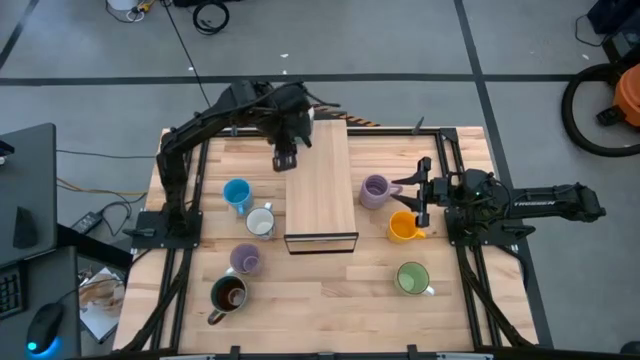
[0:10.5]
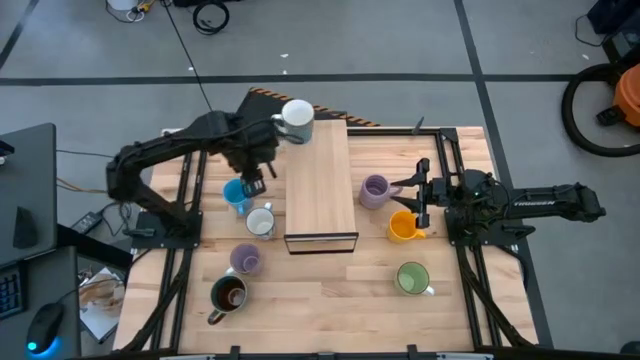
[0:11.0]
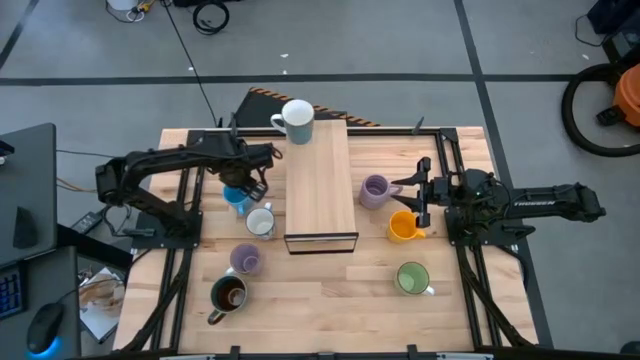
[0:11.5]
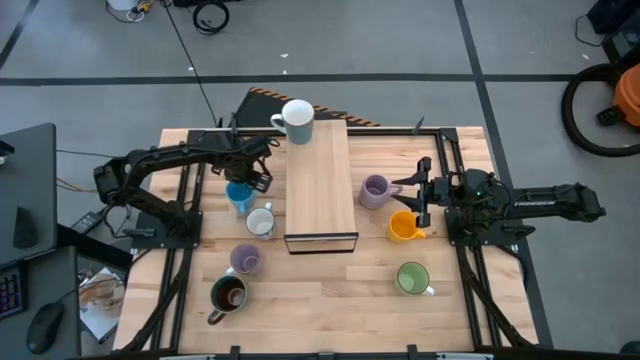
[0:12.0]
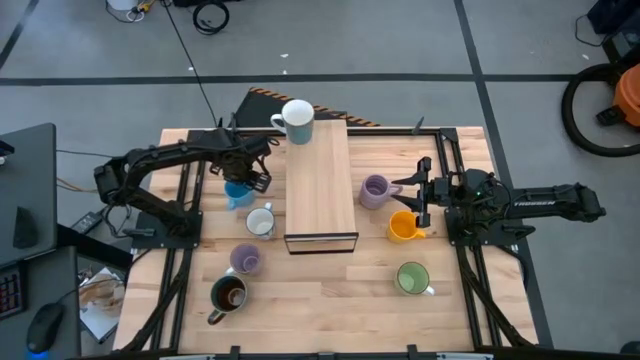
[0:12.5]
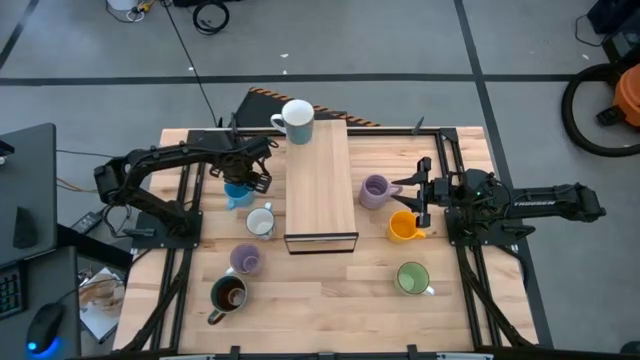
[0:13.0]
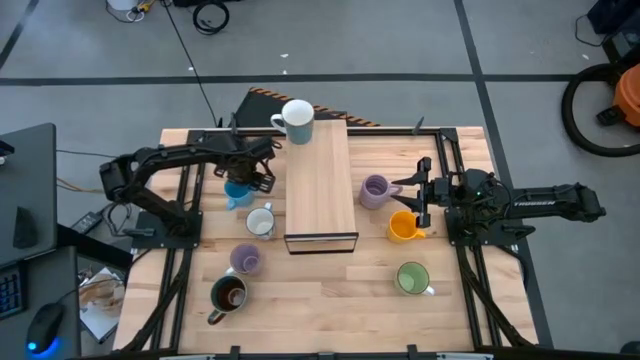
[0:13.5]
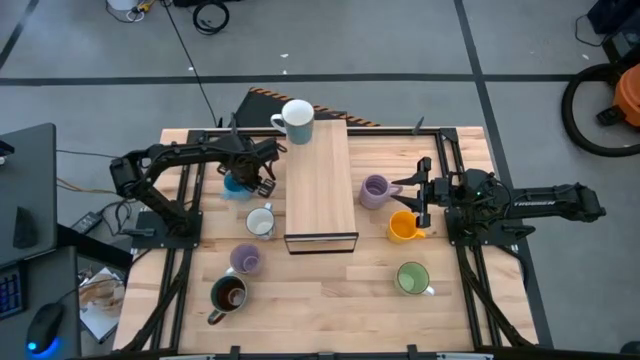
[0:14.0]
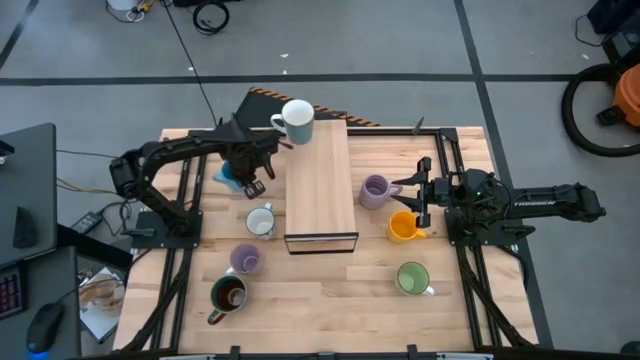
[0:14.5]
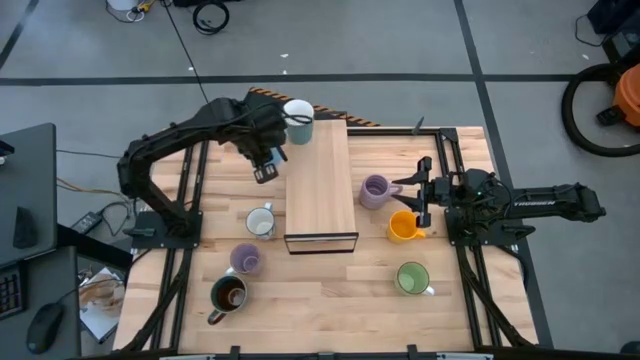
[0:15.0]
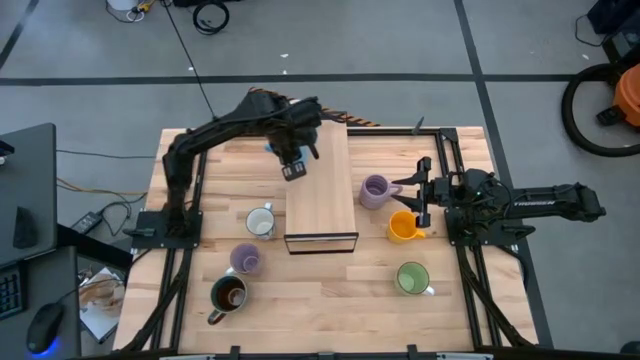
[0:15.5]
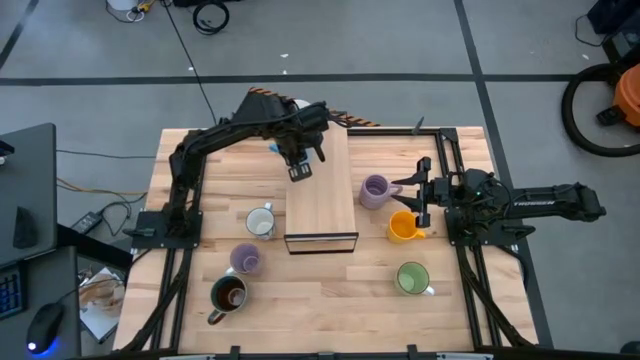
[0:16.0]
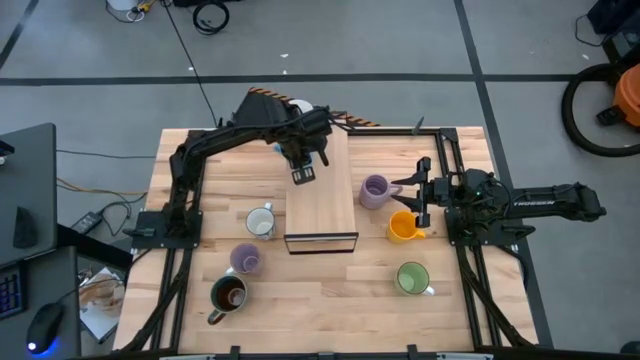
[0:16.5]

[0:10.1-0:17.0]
Task: Place coffee mugs
Put the blue mug on the shelf

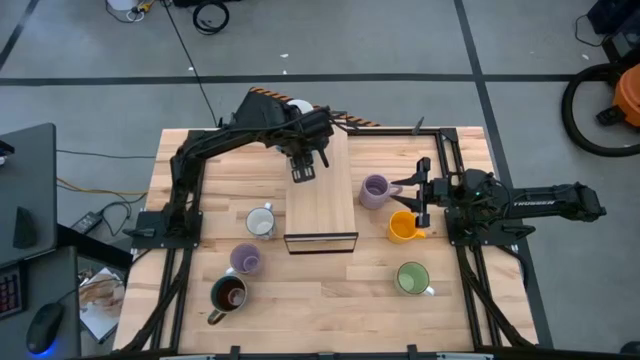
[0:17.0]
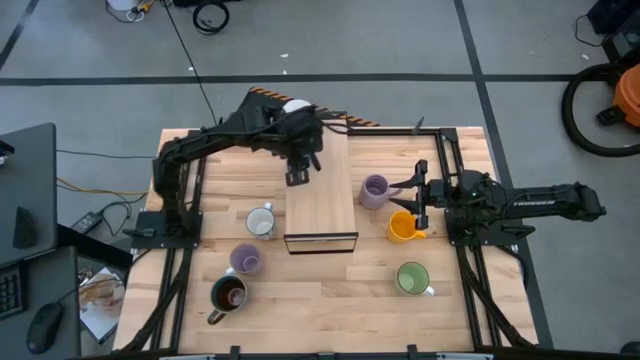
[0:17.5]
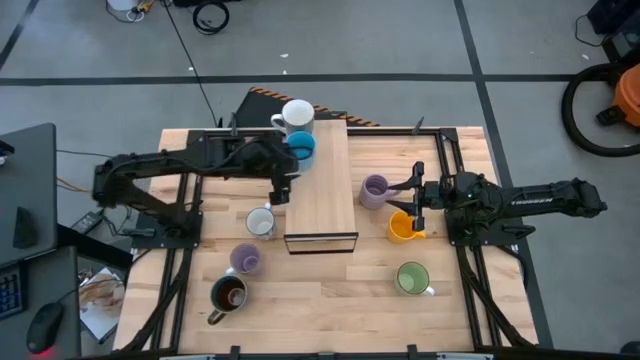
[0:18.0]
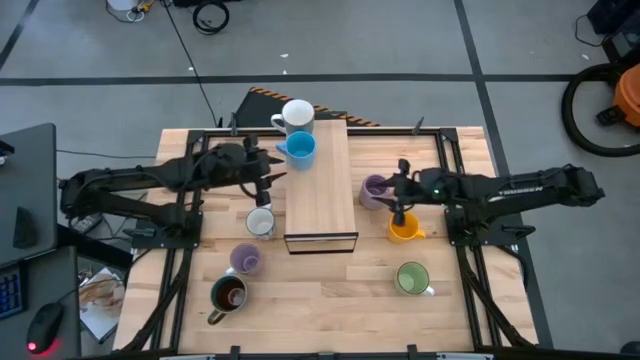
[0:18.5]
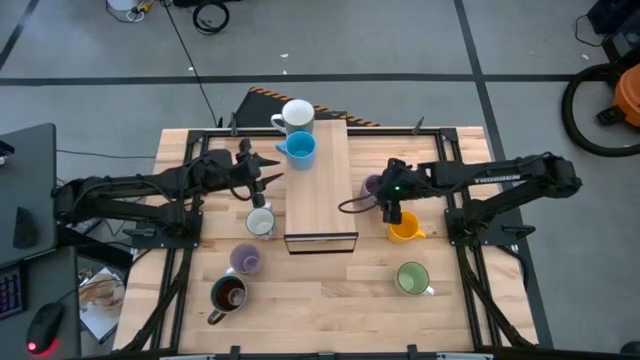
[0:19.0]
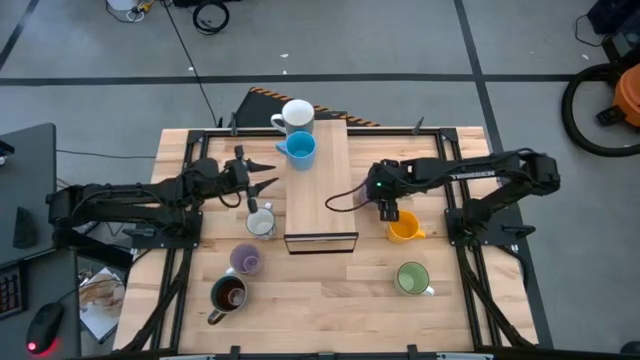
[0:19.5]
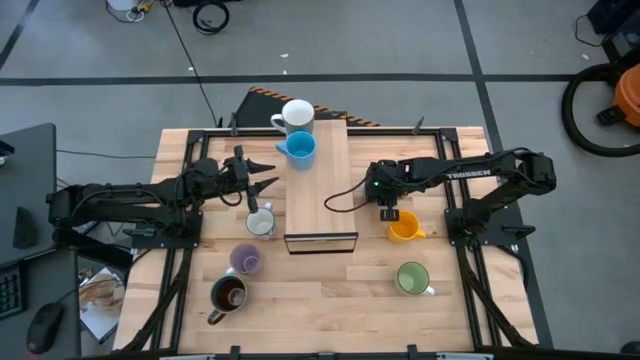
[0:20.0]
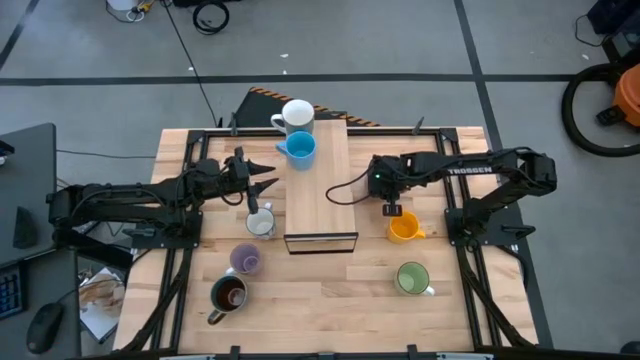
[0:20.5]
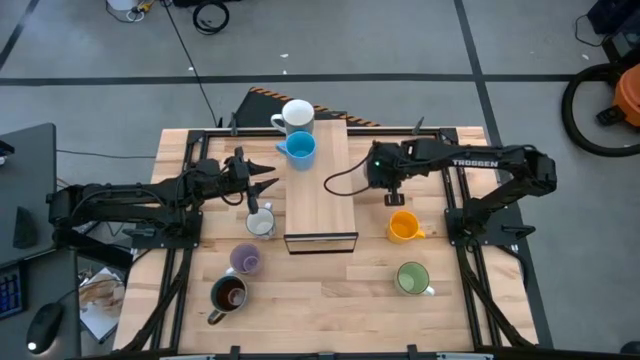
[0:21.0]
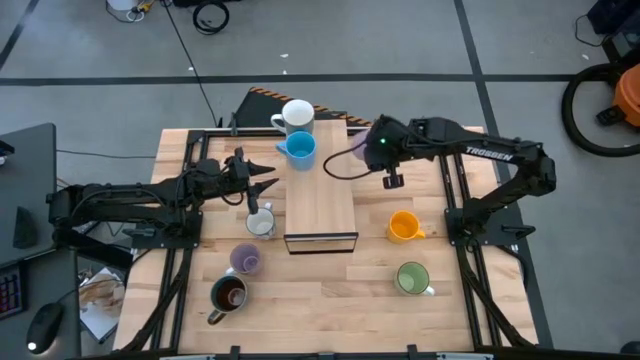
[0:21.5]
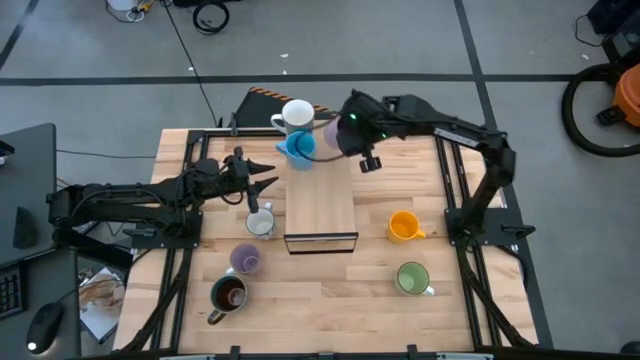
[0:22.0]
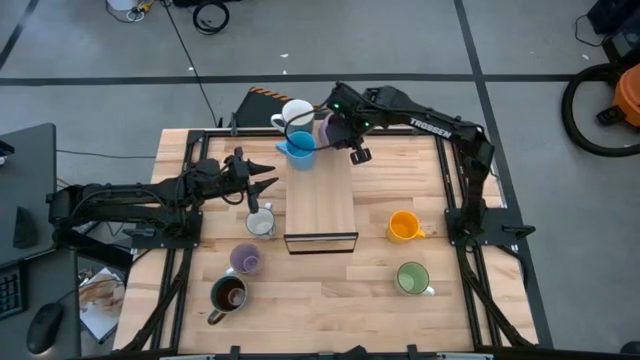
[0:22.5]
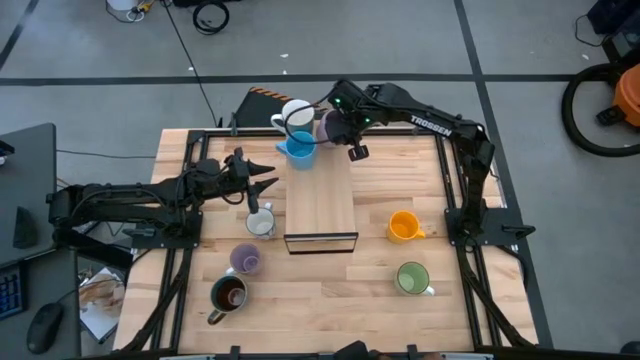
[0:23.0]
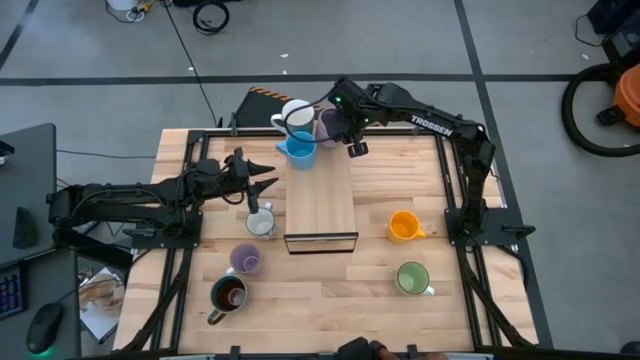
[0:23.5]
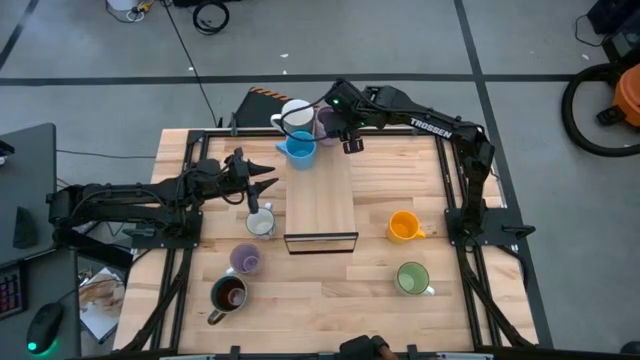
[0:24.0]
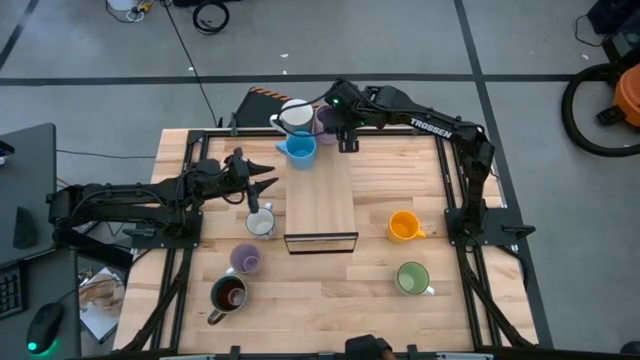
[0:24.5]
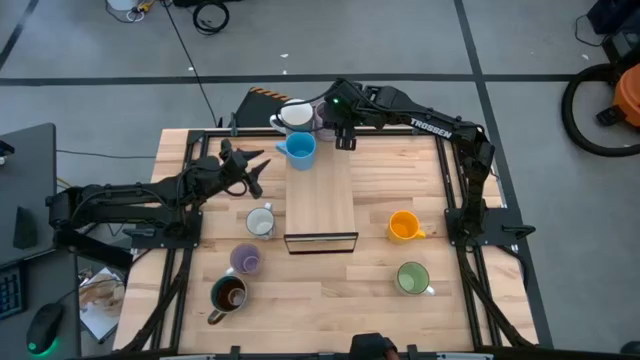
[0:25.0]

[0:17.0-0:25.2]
Put the top purple mug on the shelf

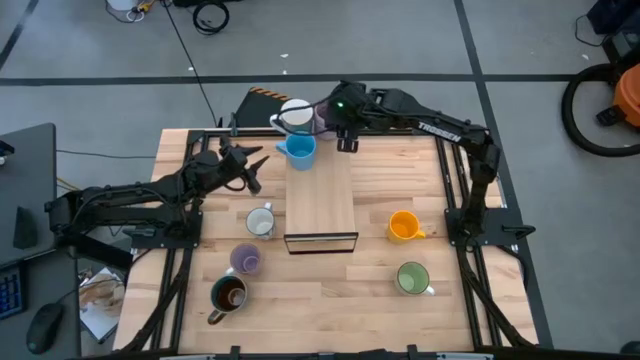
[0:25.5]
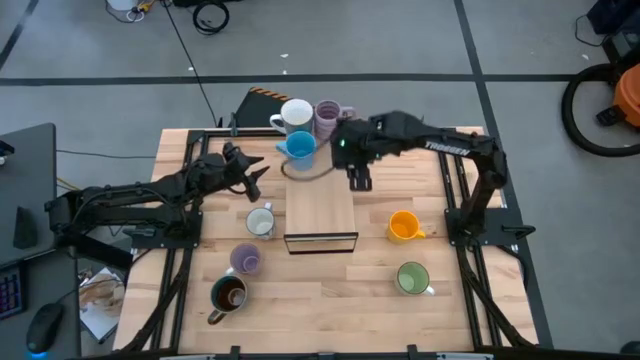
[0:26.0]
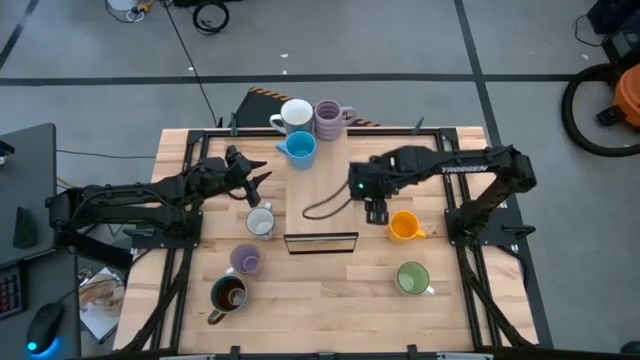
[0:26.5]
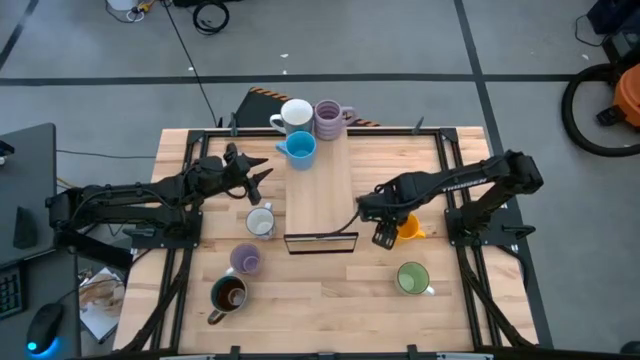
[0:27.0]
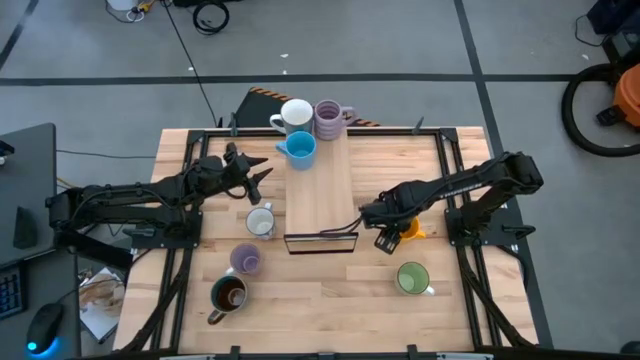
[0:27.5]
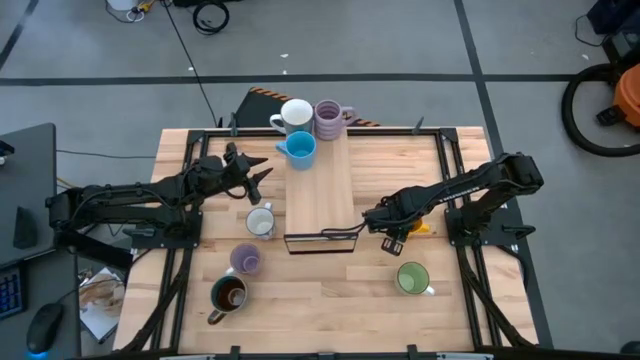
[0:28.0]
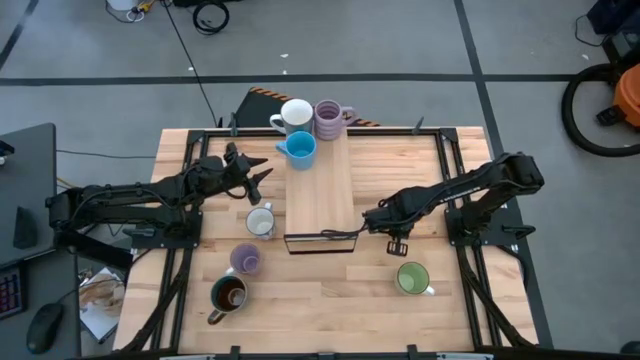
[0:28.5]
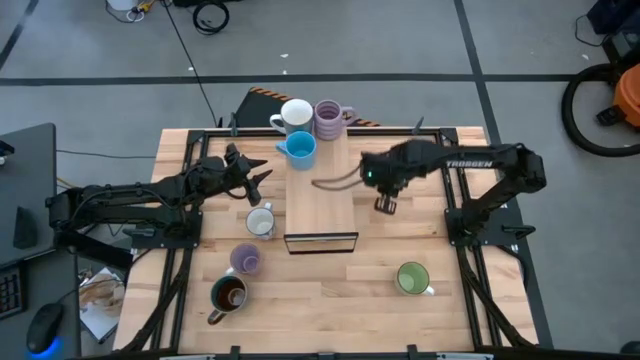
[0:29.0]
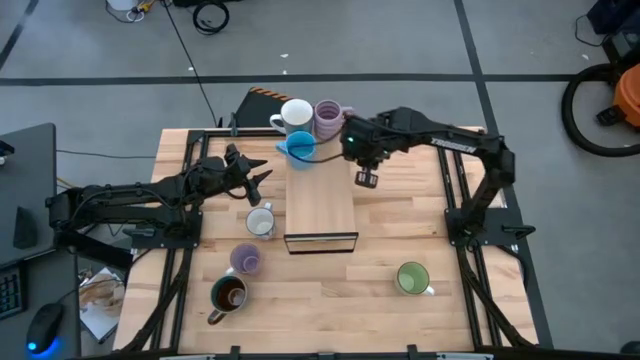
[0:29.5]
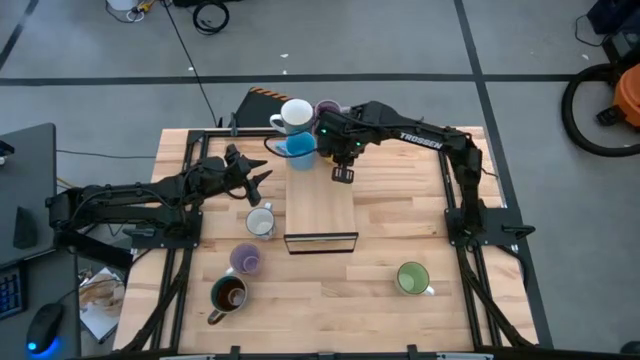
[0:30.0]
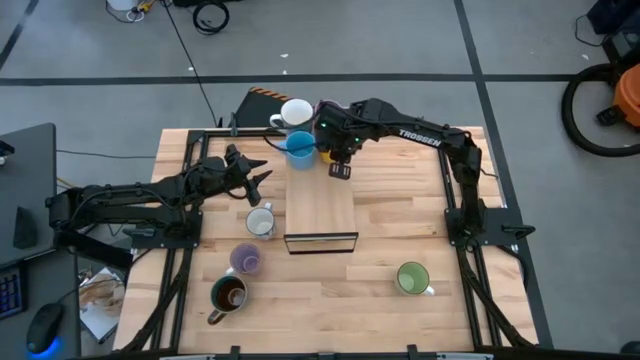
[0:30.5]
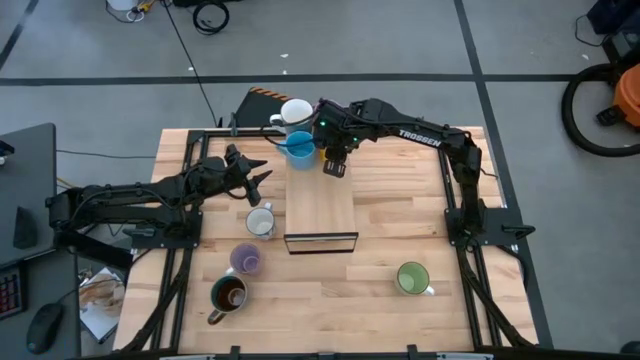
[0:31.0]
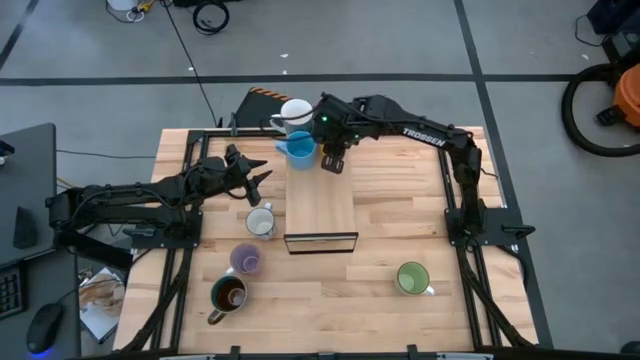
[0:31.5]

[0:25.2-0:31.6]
Put the yellow mug on the shelf
